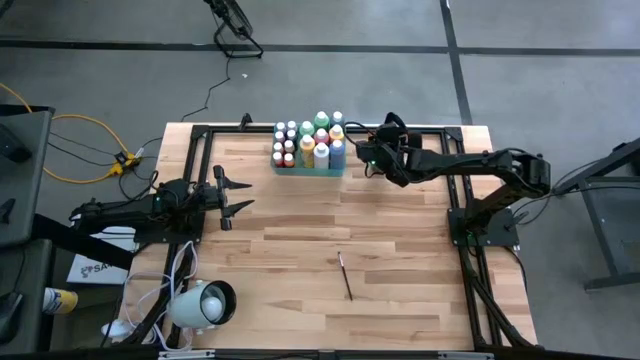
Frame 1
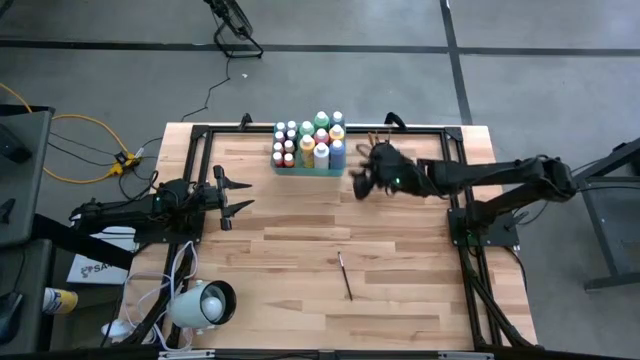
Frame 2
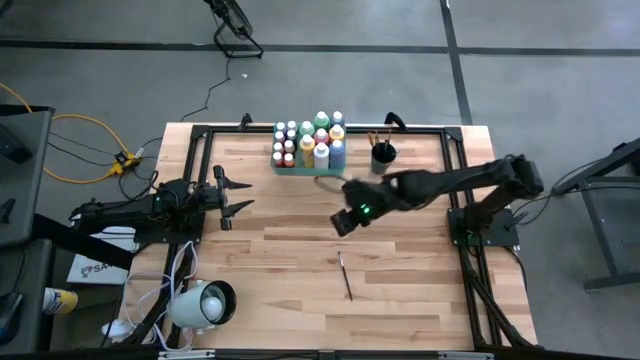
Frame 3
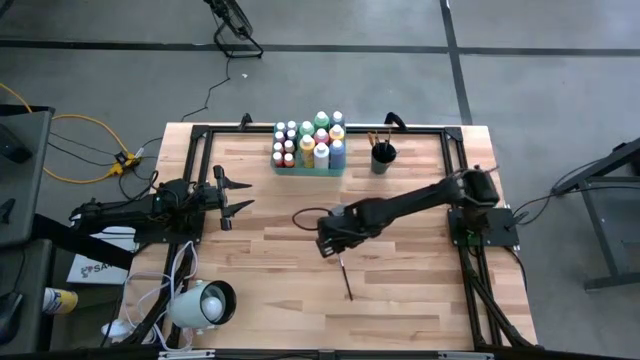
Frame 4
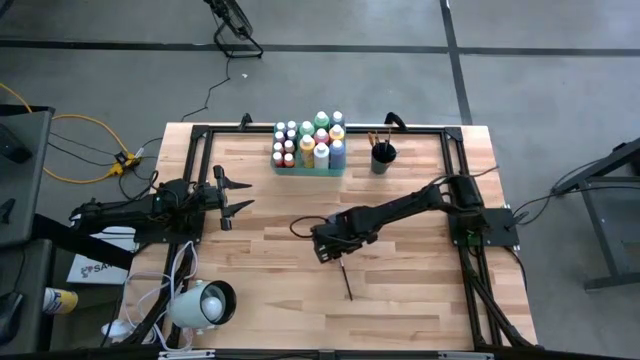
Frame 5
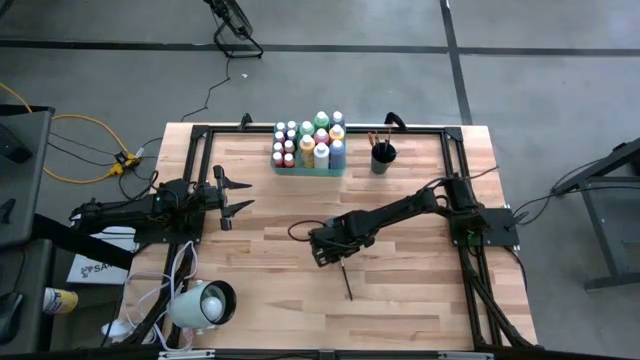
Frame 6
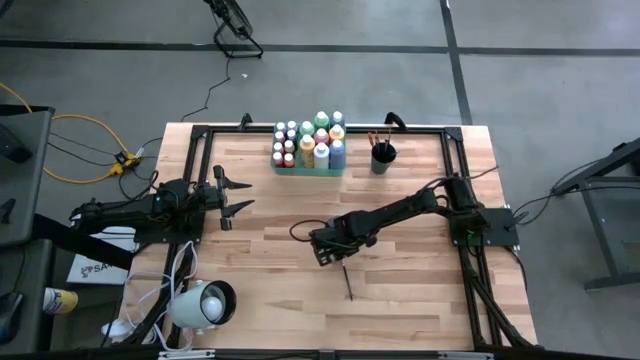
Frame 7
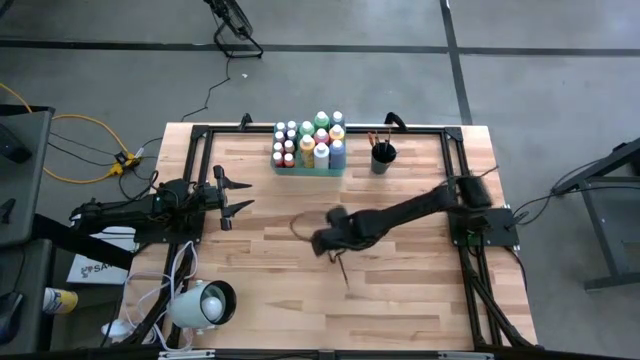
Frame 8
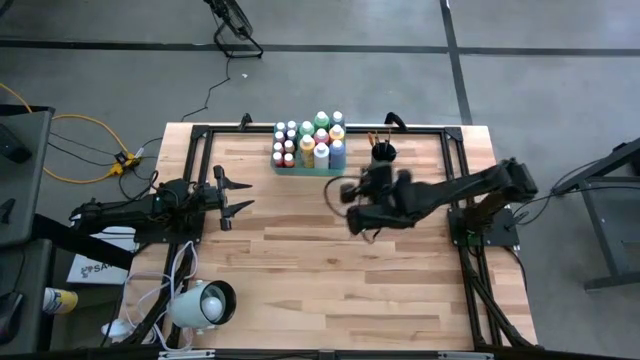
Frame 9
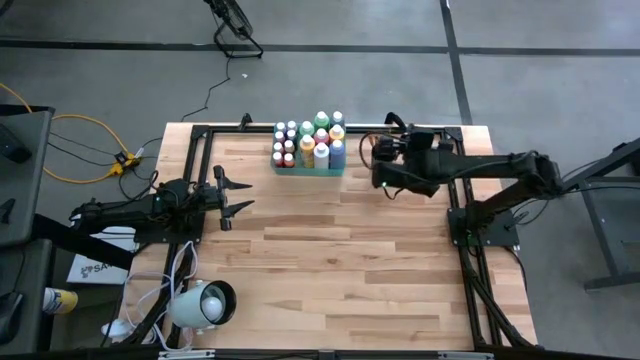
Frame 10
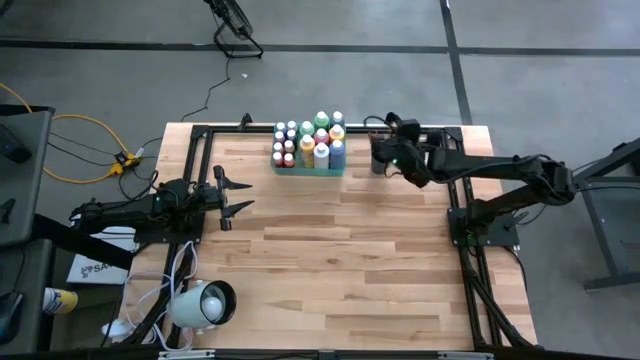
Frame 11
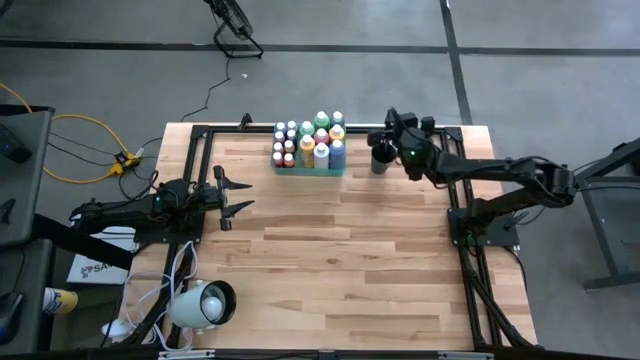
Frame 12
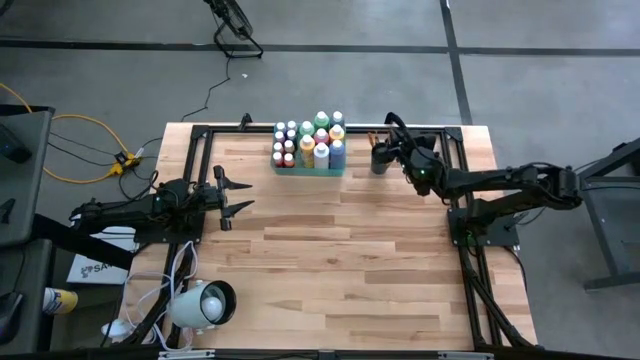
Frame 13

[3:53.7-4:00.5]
Task: Pick & Place Paint Supplies
Put the silver paint brush into the green cup

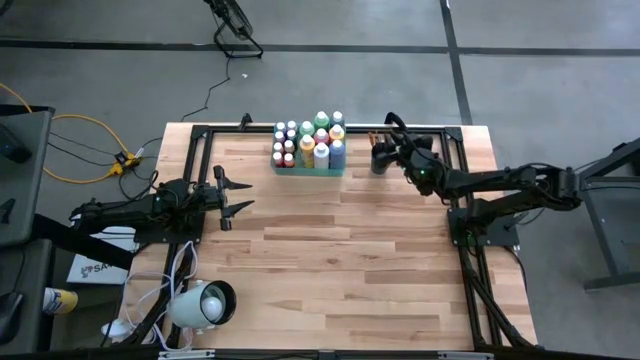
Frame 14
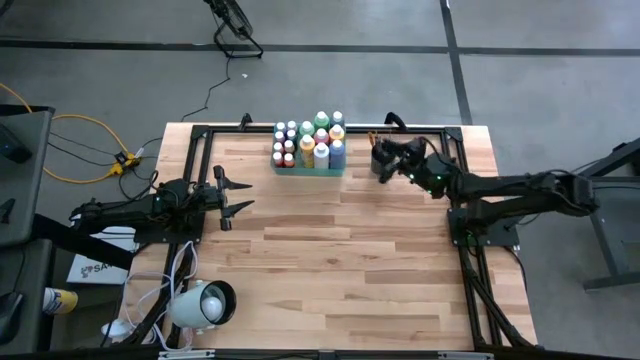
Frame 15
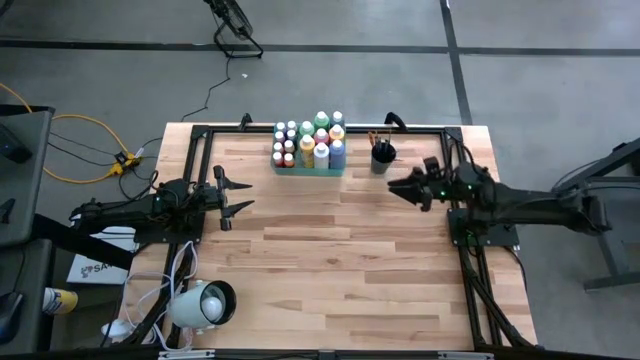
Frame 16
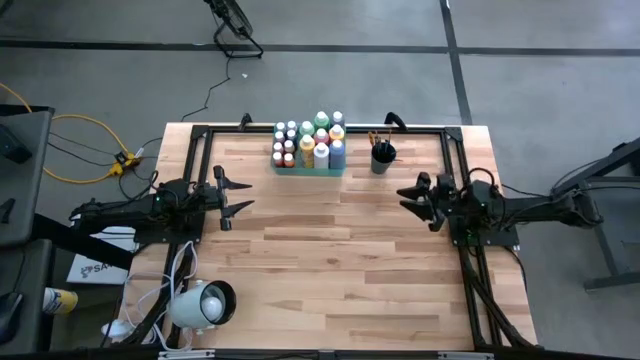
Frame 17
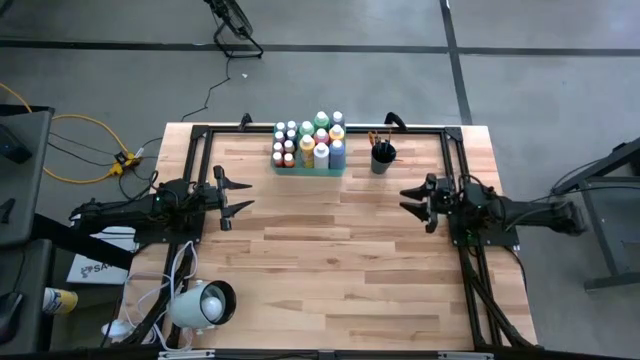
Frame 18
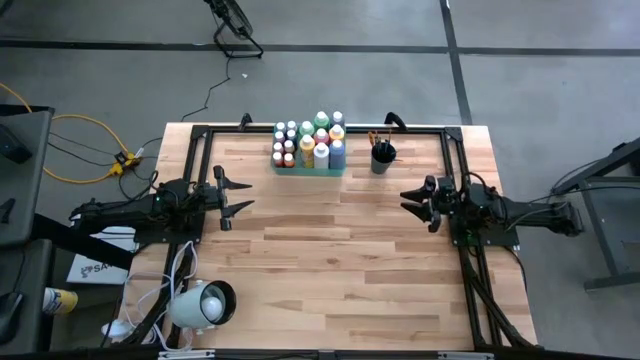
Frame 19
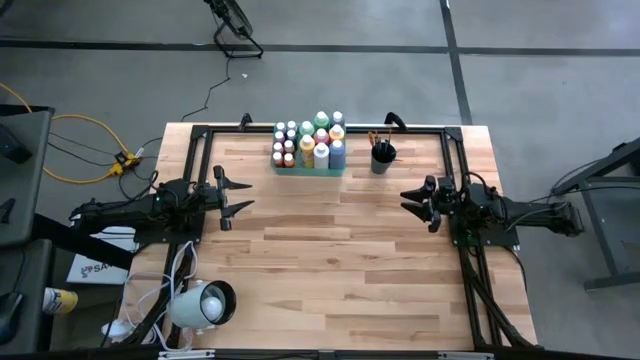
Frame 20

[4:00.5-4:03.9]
Return to Home Position

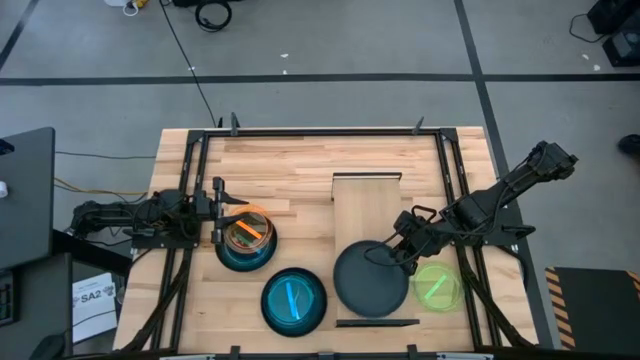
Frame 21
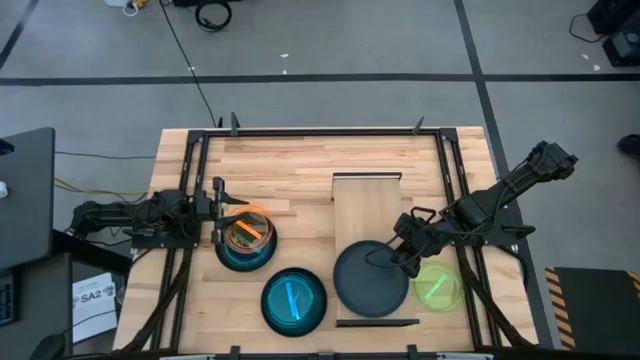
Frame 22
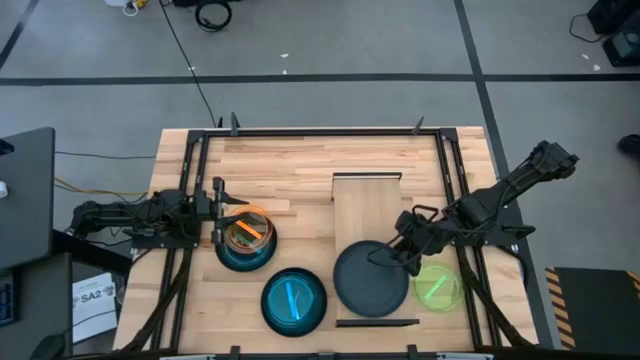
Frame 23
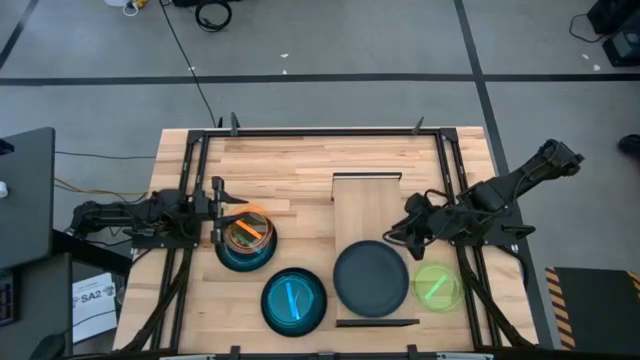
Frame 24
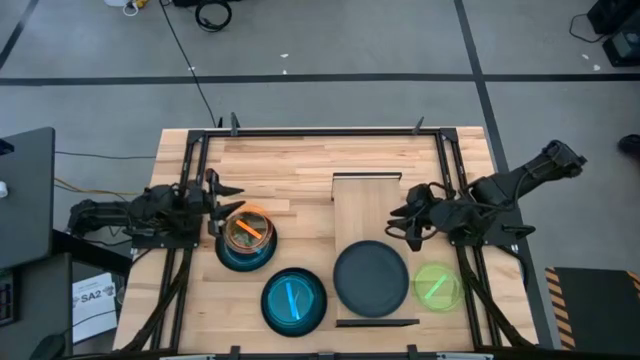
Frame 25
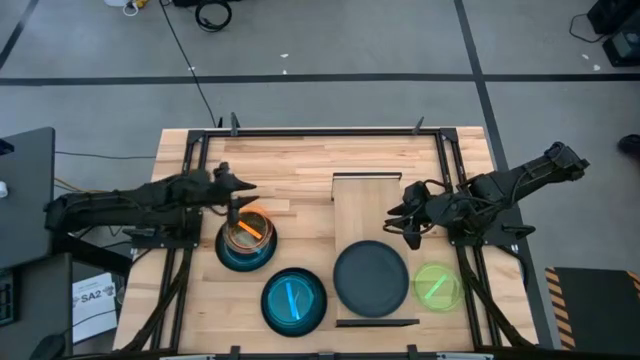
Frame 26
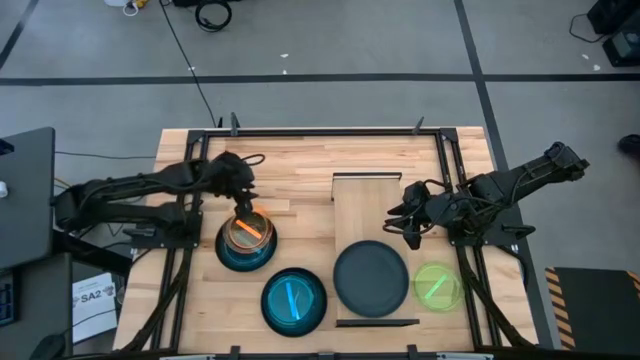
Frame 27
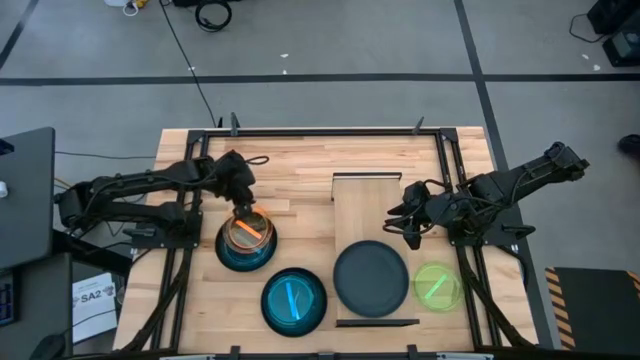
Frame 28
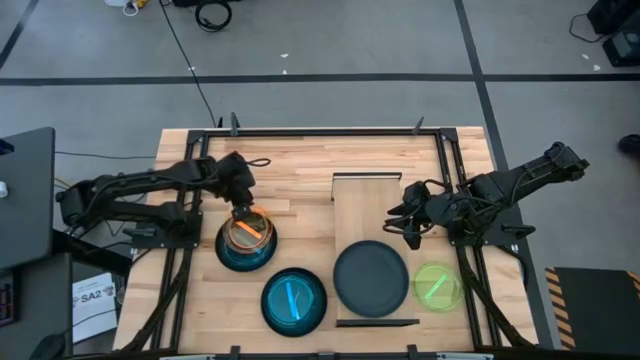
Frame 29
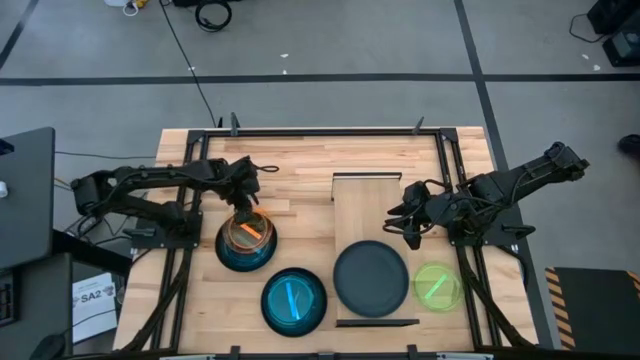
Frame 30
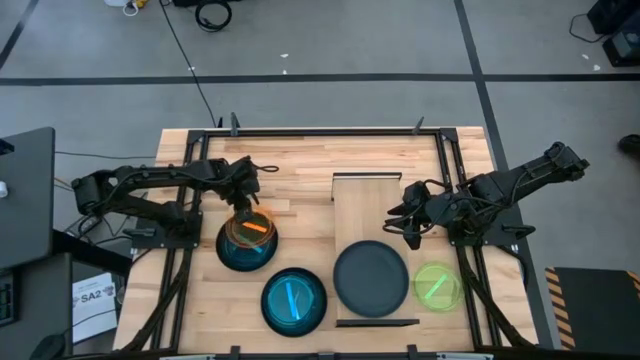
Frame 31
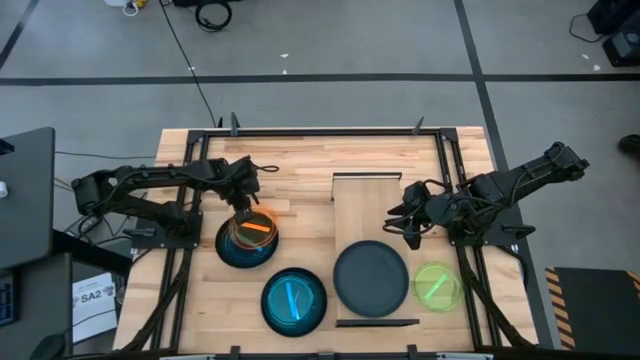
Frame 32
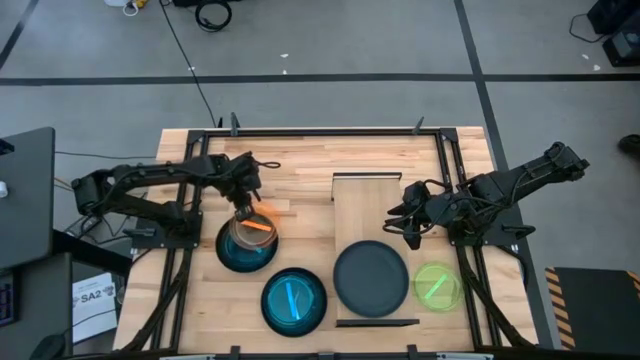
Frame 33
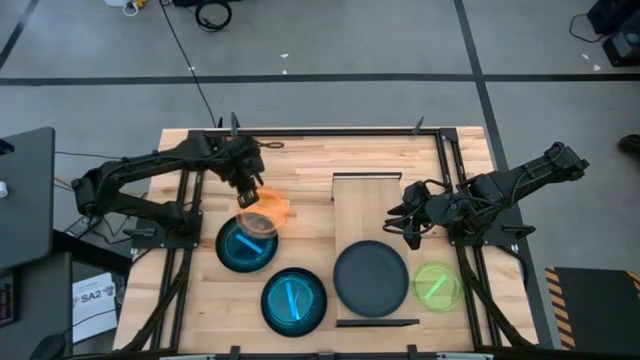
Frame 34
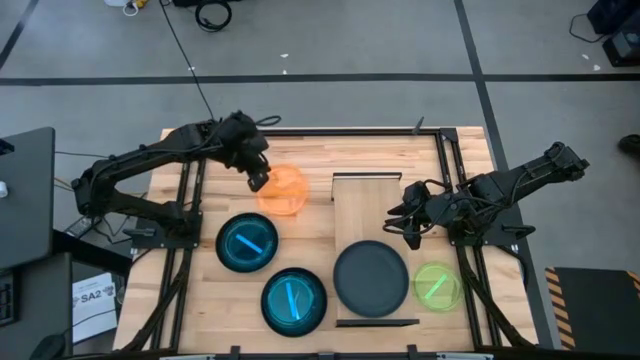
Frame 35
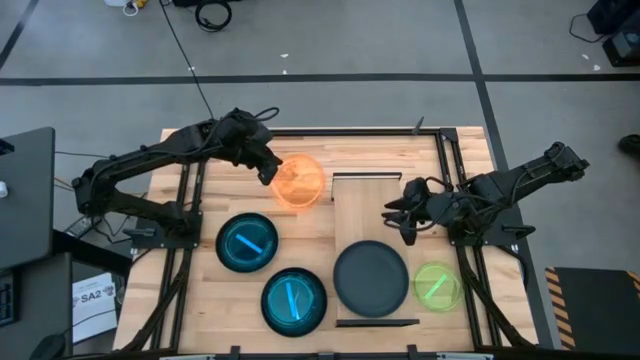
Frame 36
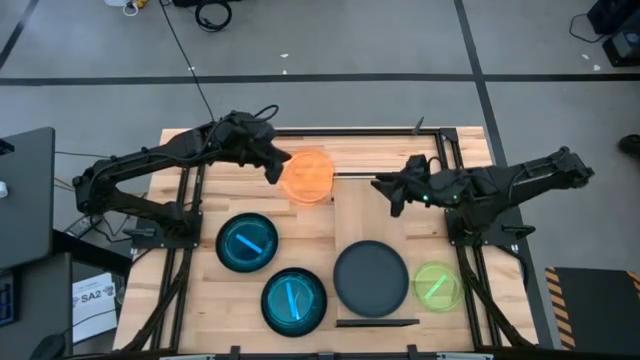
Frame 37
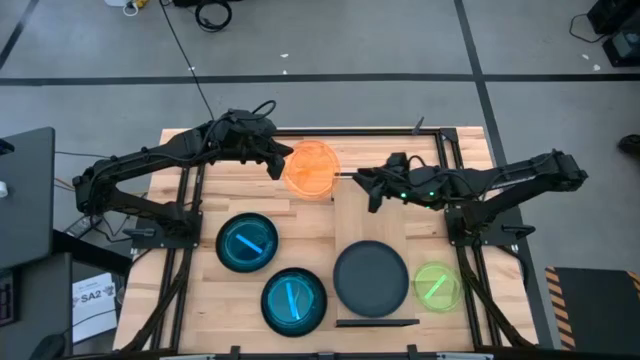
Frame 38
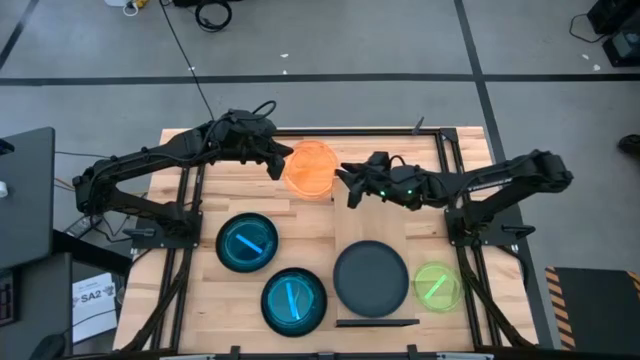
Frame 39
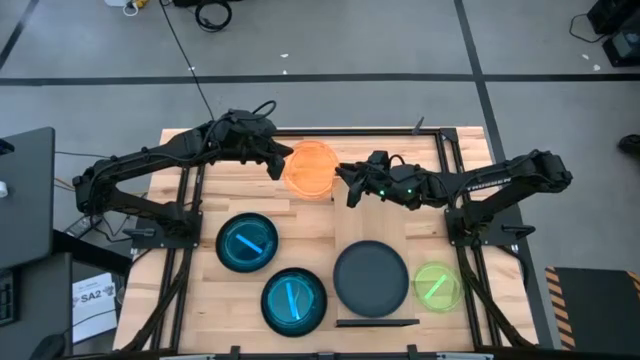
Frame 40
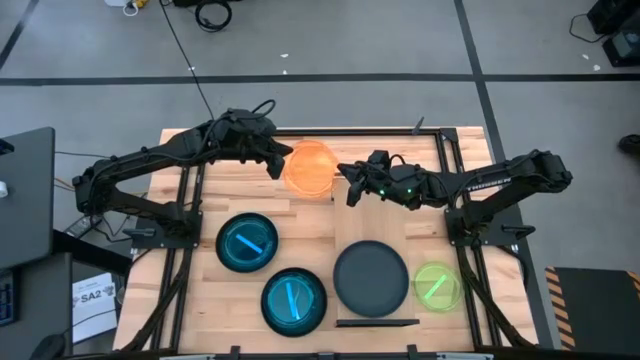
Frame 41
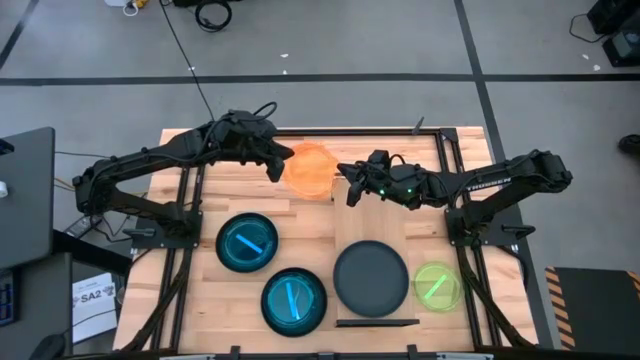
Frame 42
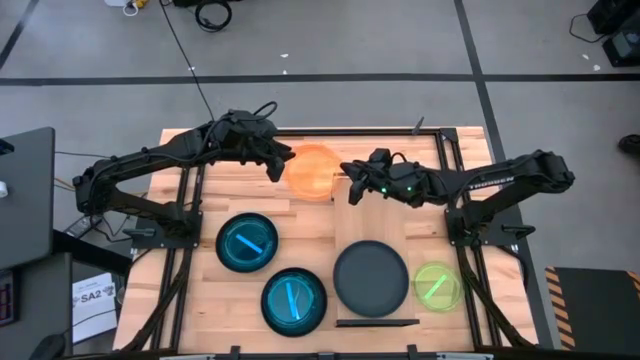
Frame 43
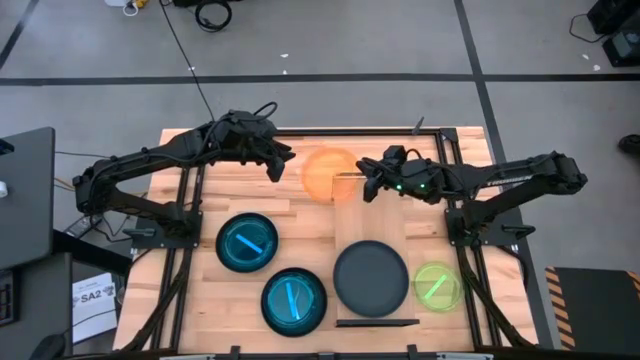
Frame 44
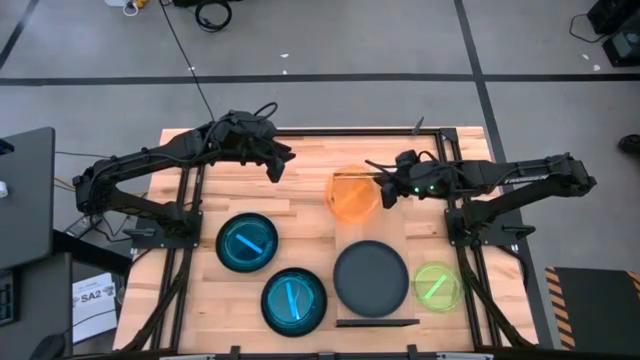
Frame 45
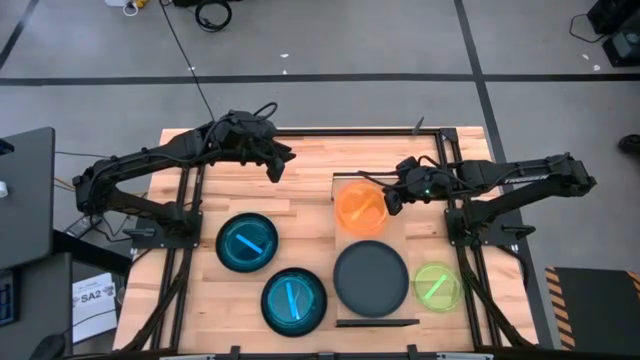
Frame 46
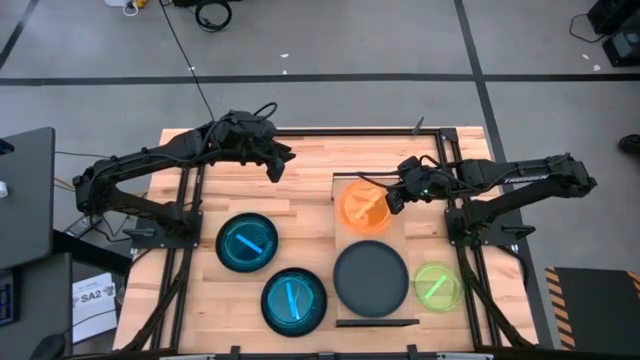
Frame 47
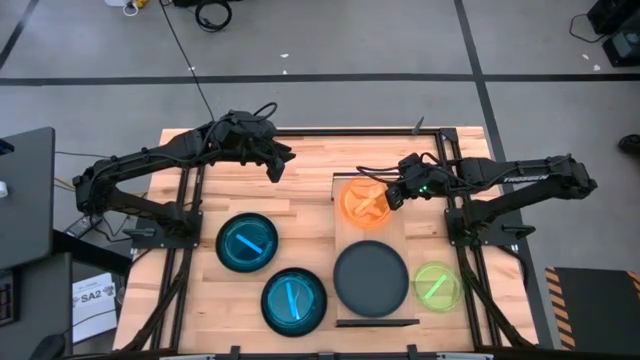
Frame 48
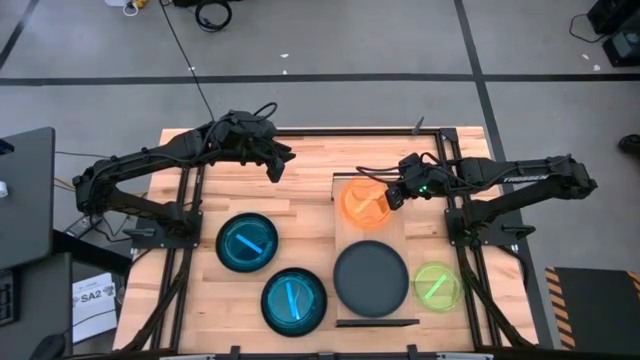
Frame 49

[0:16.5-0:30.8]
Task: Place and stack plates onto a shelf
Put the orange plate on the shelf
